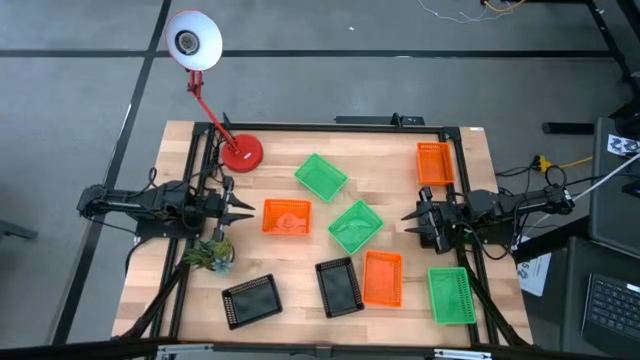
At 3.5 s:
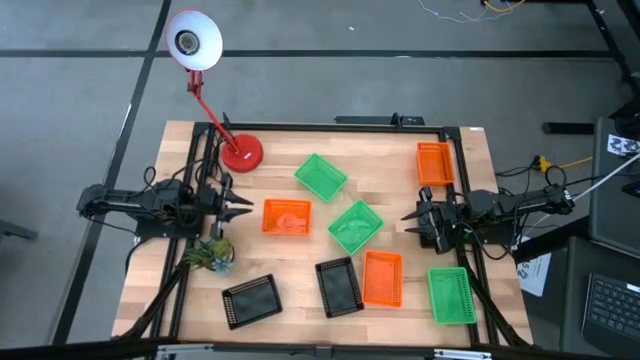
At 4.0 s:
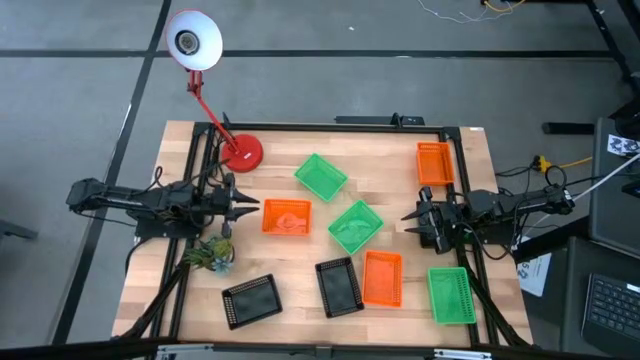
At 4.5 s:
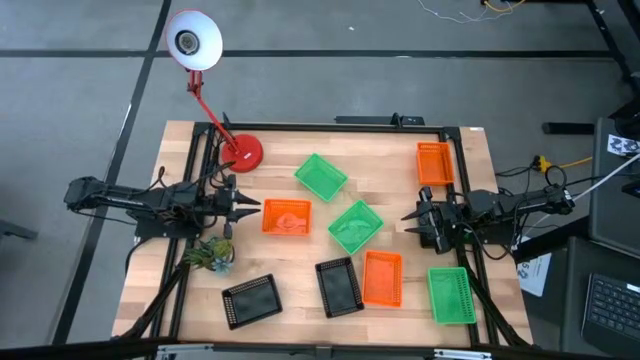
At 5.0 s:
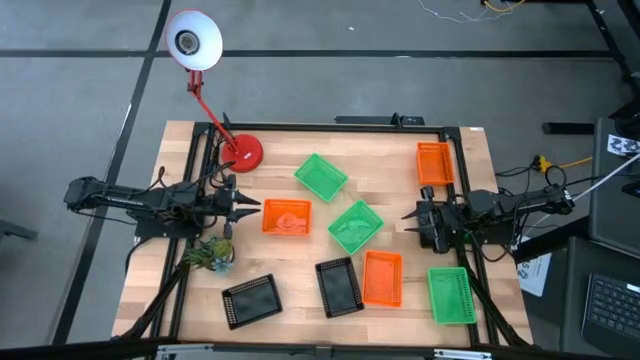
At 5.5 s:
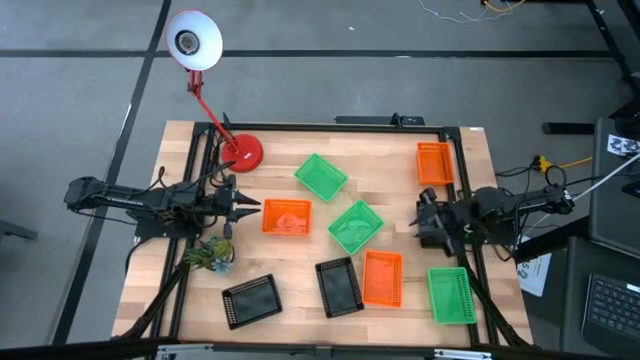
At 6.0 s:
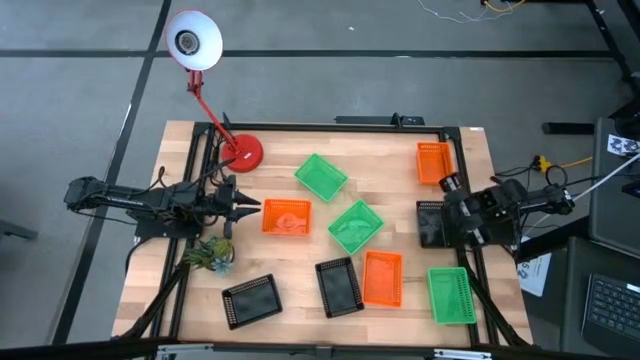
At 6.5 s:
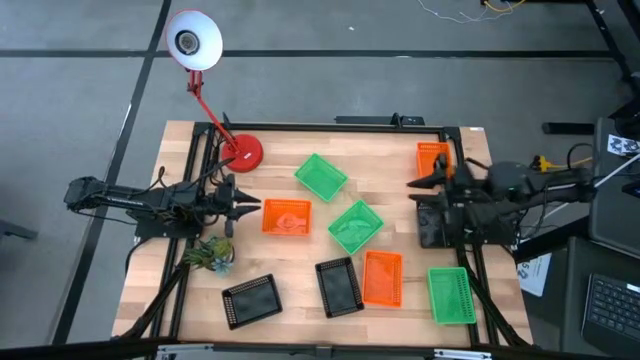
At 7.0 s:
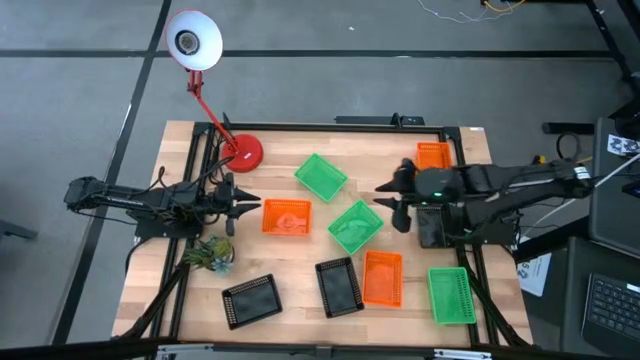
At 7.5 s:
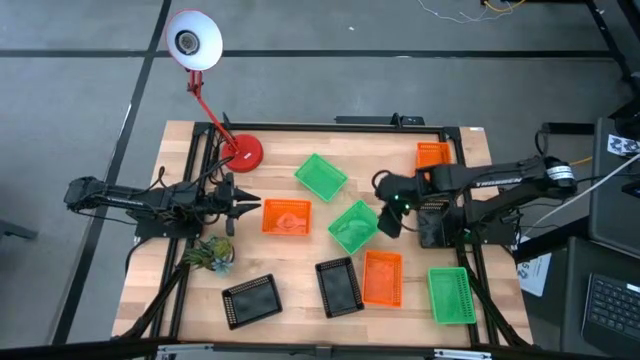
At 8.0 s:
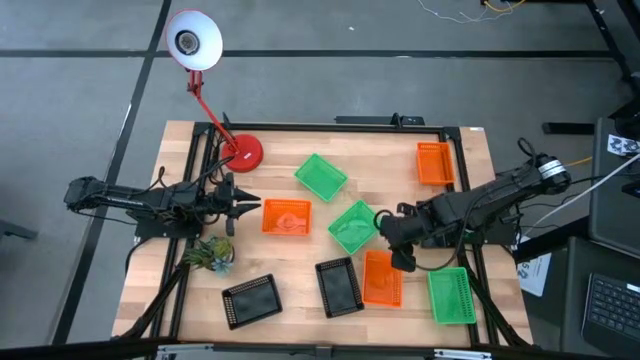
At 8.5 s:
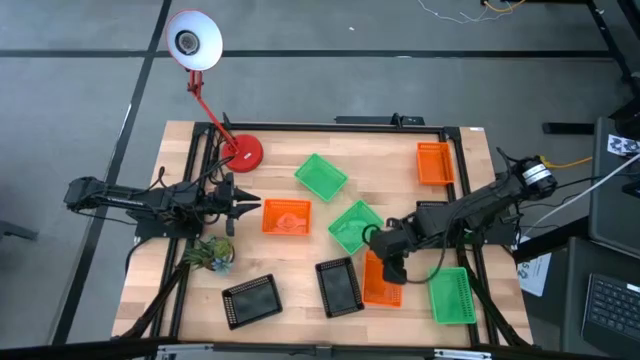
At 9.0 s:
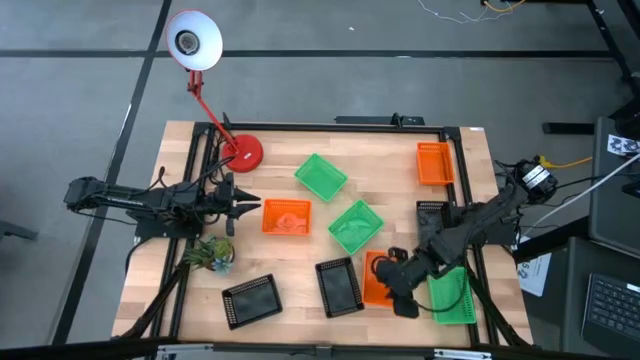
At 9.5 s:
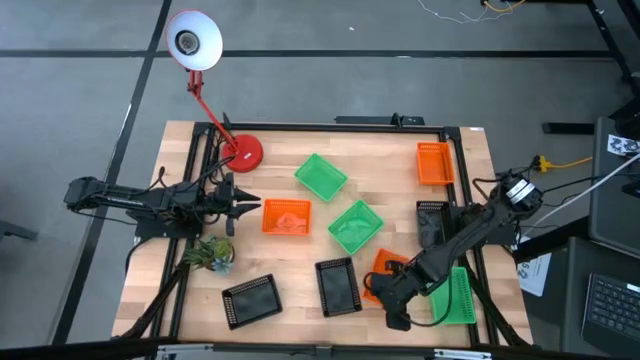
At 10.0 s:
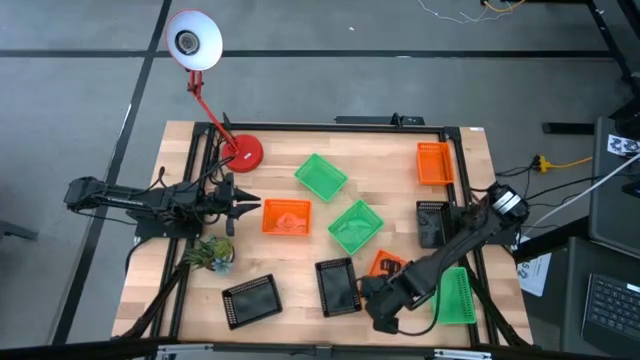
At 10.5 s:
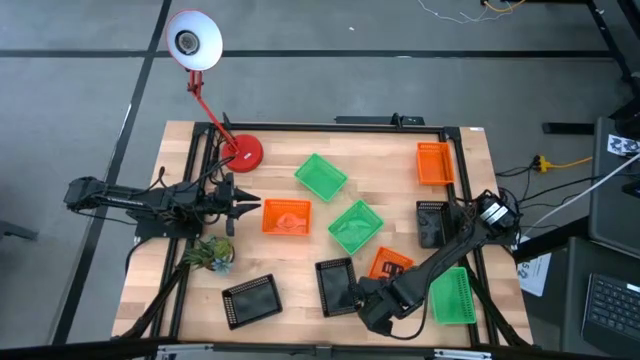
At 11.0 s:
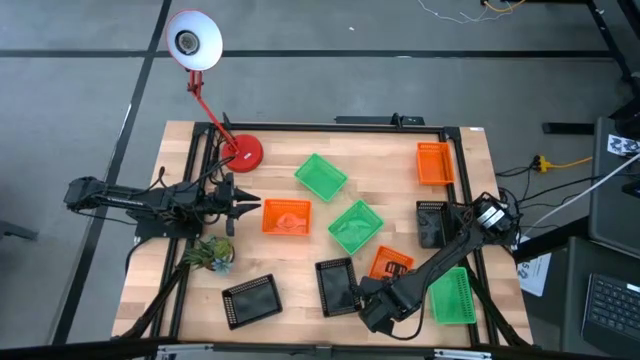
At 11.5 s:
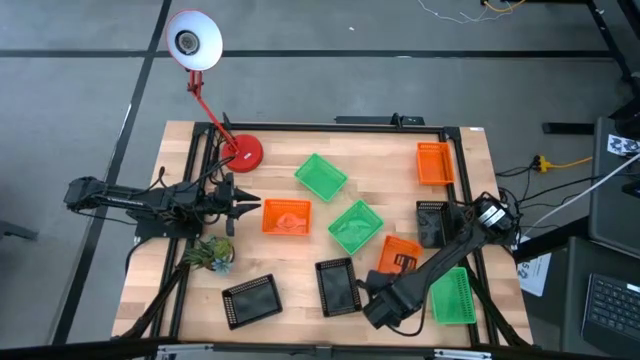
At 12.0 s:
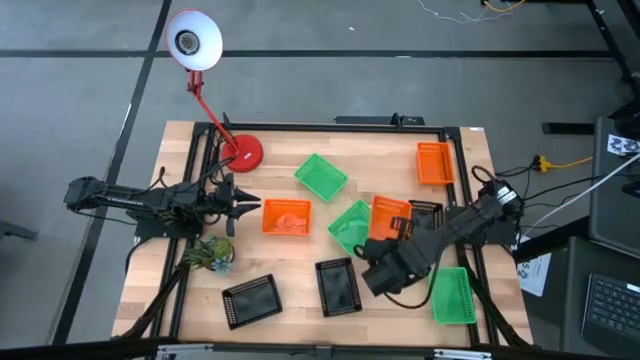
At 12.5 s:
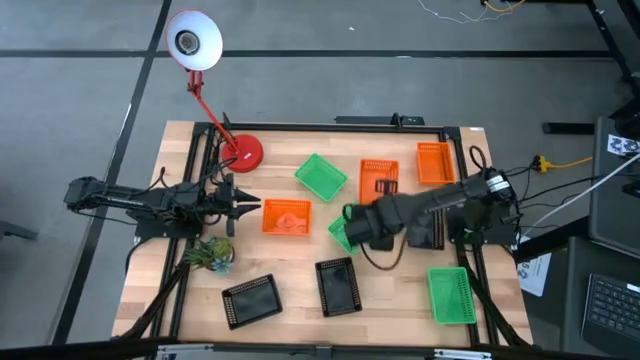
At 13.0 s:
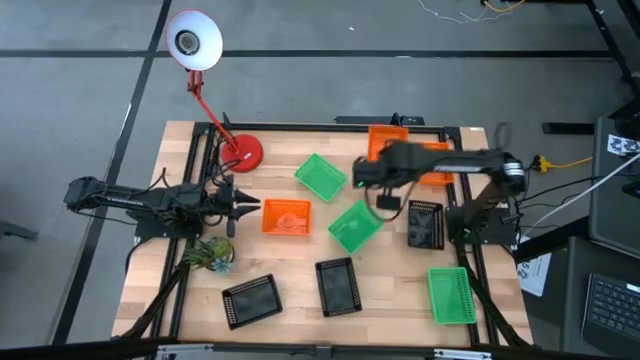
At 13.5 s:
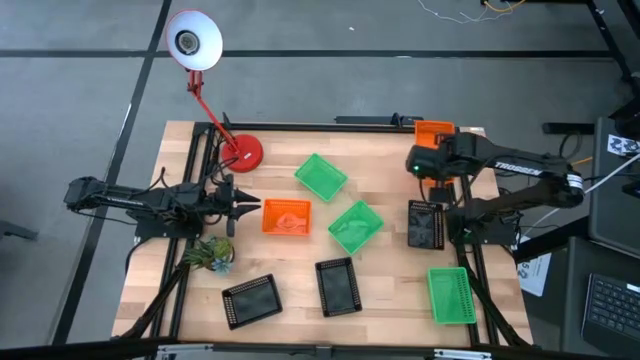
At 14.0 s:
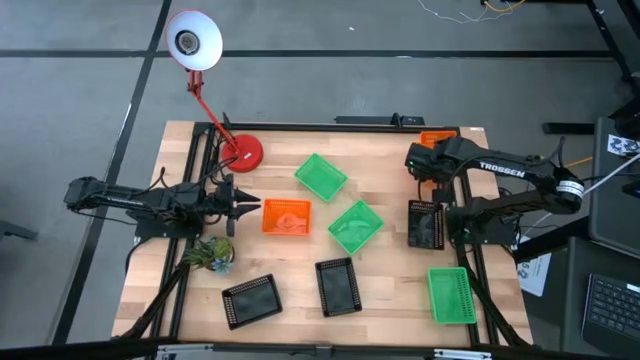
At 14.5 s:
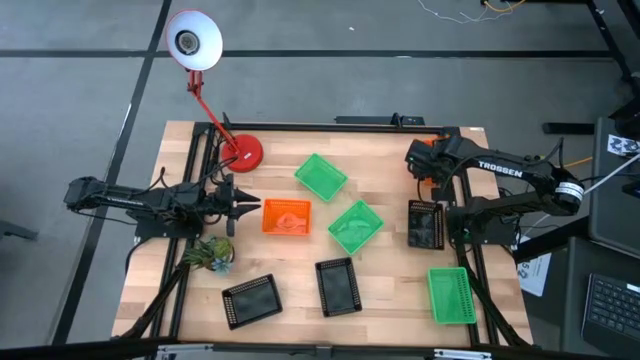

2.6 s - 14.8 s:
Stack the bottom orange bin on the right orange bin

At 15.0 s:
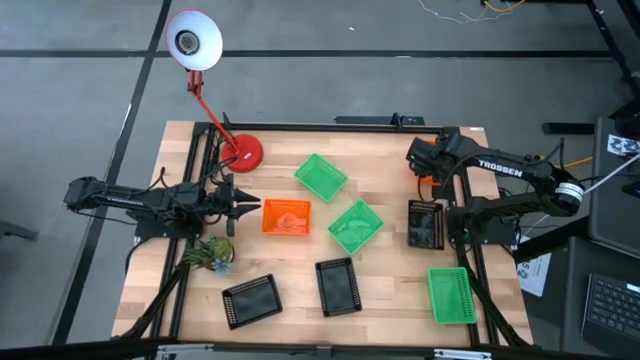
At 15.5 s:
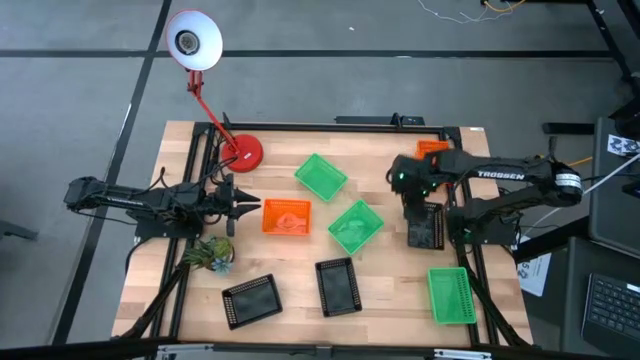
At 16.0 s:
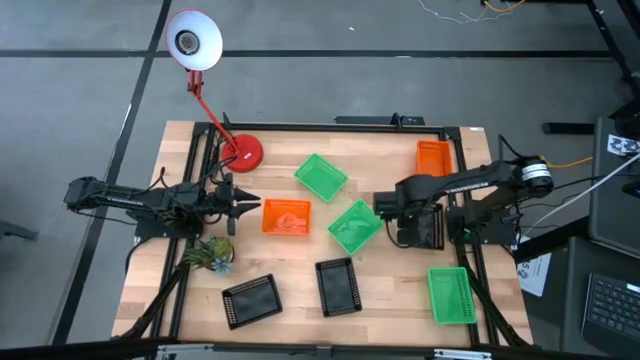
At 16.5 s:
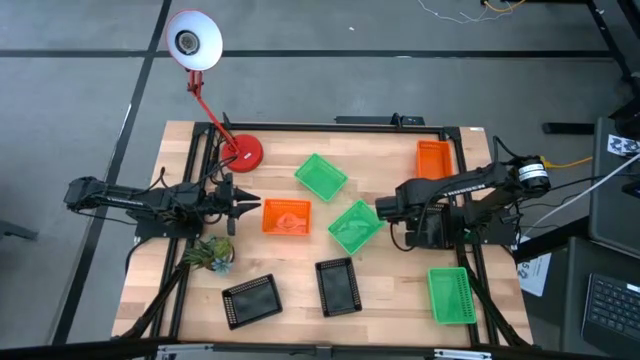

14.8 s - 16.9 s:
Adjust the right black bin

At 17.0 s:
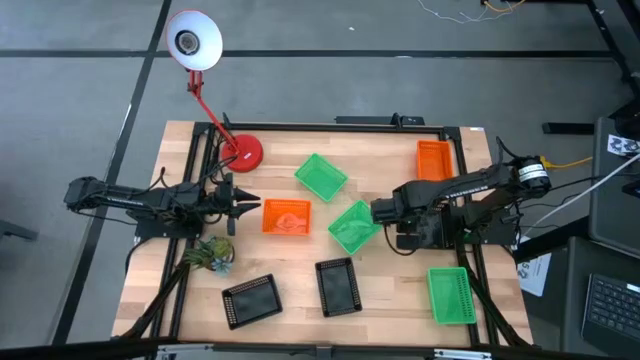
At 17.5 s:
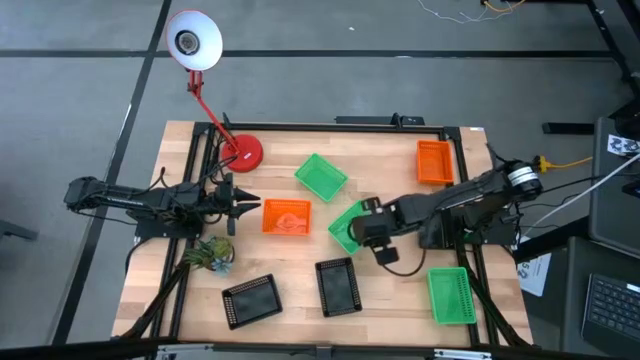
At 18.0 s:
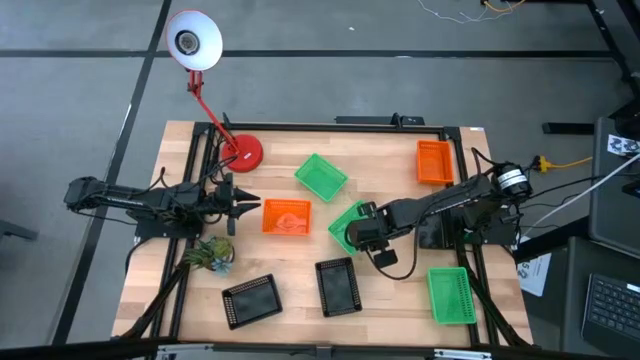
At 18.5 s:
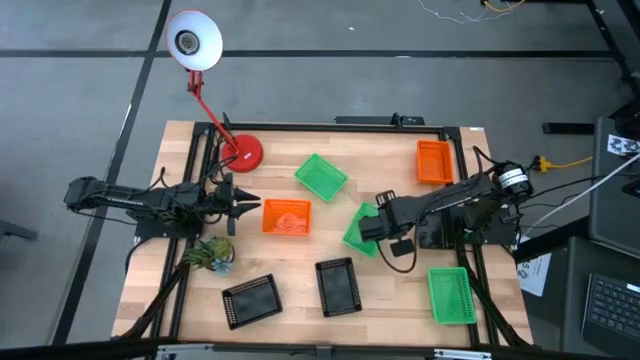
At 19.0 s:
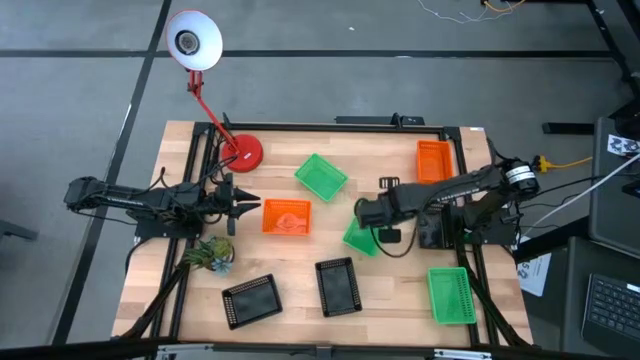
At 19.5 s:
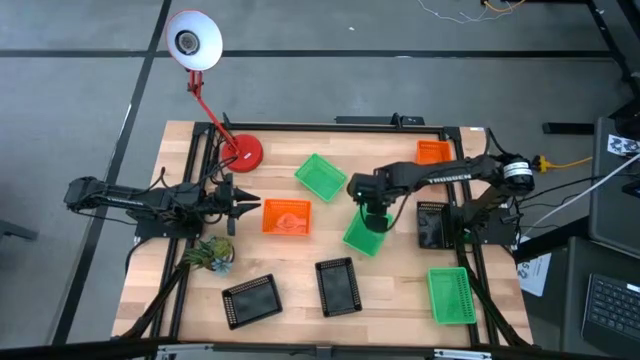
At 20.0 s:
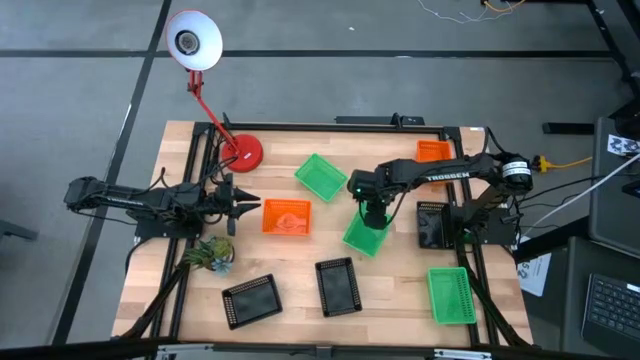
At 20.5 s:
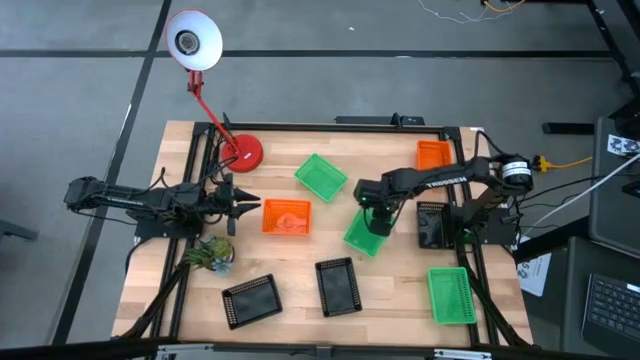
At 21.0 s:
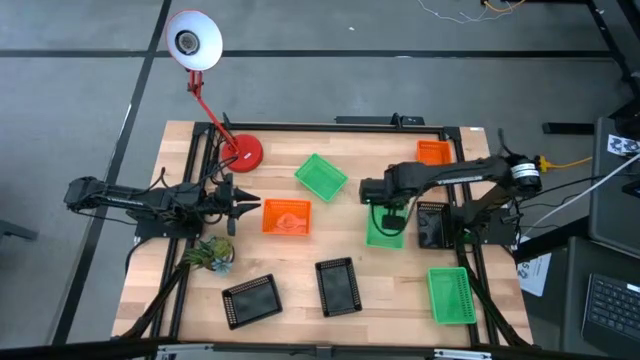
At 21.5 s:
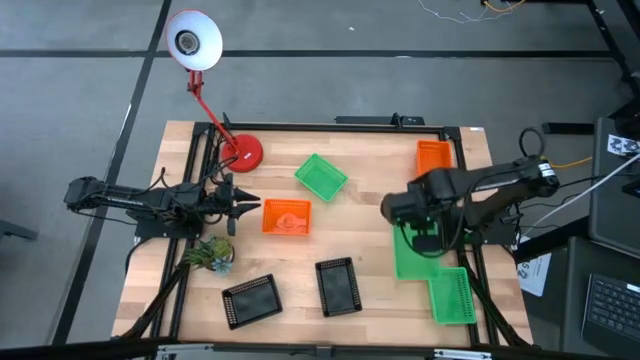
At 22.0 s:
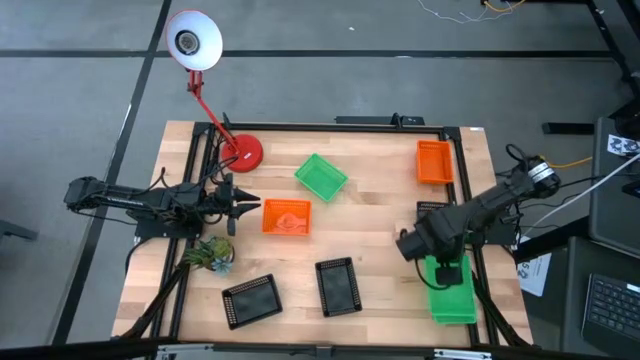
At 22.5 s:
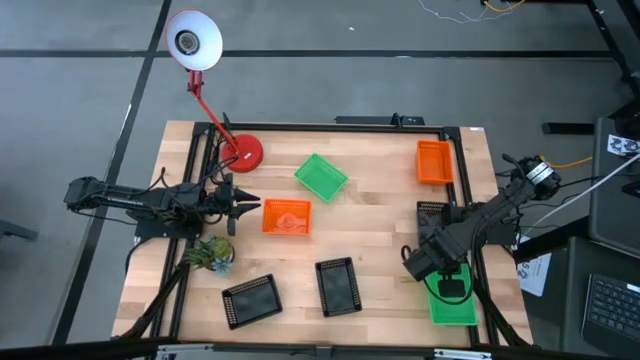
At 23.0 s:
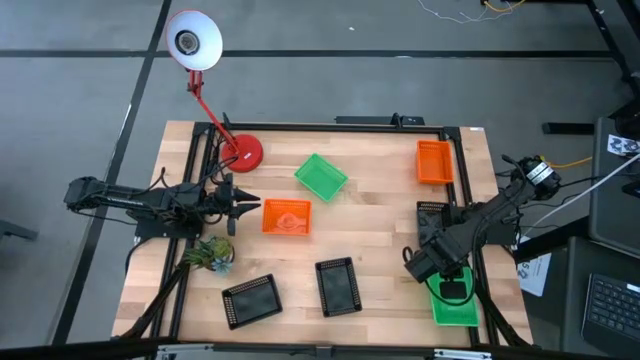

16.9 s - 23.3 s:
Stack the middle green bin on the bottom green bin
